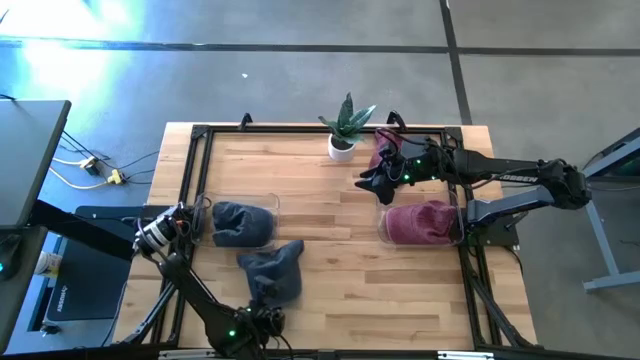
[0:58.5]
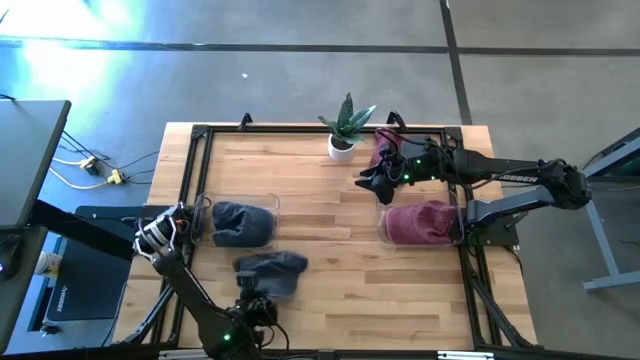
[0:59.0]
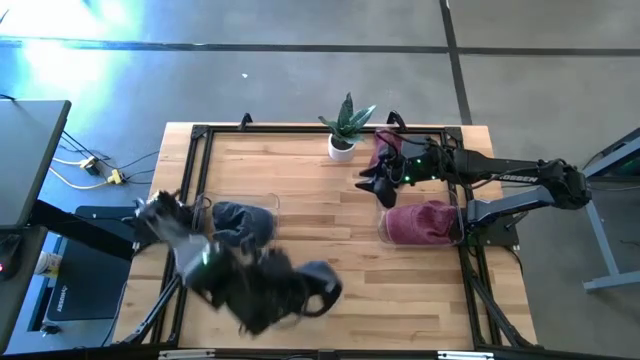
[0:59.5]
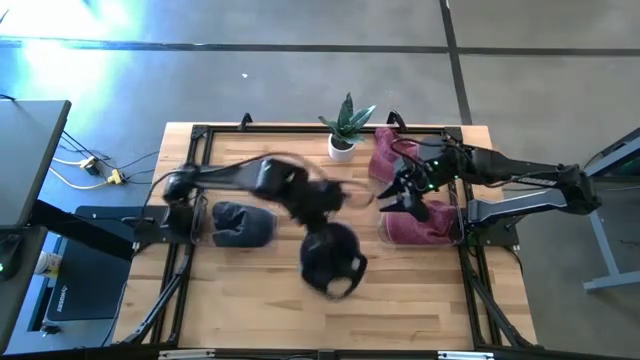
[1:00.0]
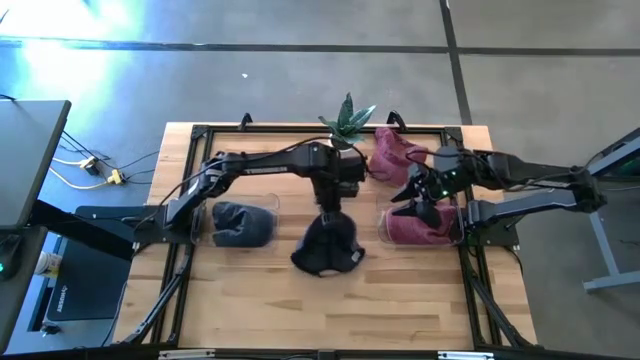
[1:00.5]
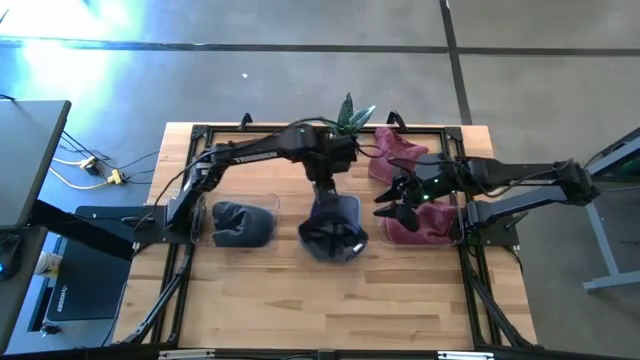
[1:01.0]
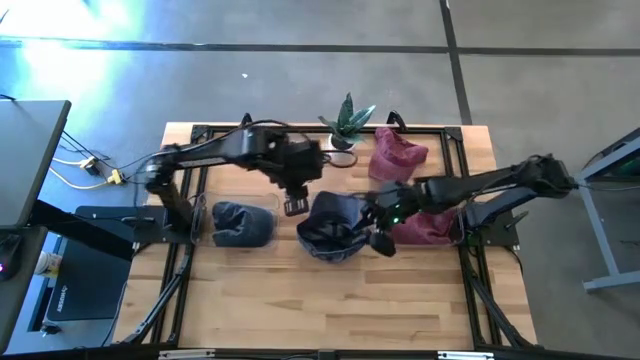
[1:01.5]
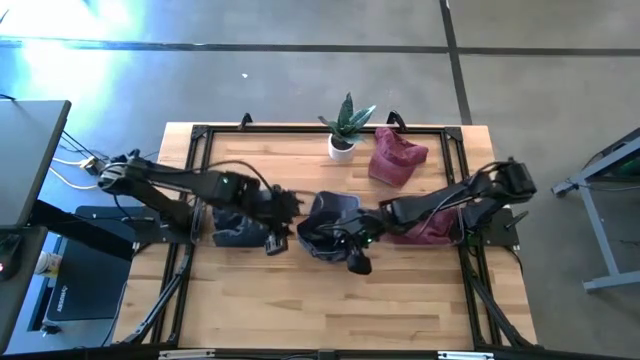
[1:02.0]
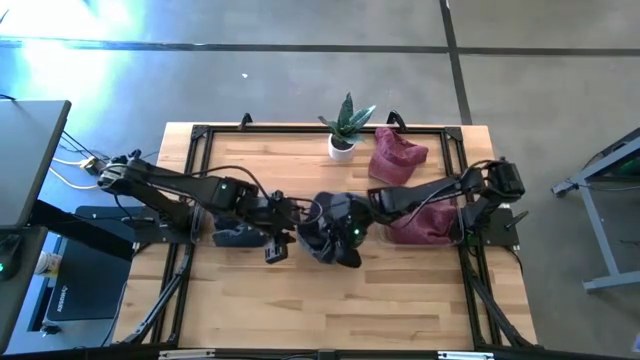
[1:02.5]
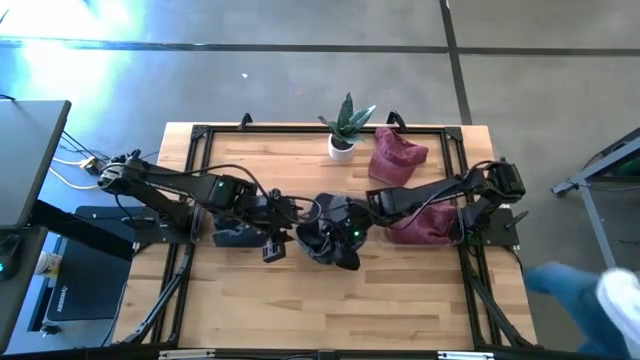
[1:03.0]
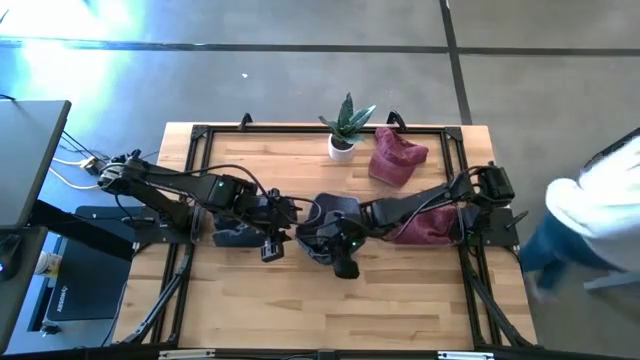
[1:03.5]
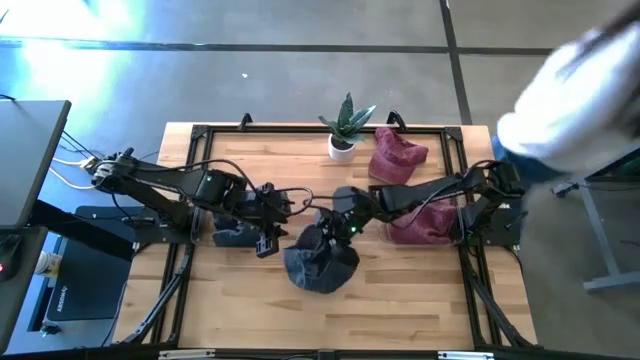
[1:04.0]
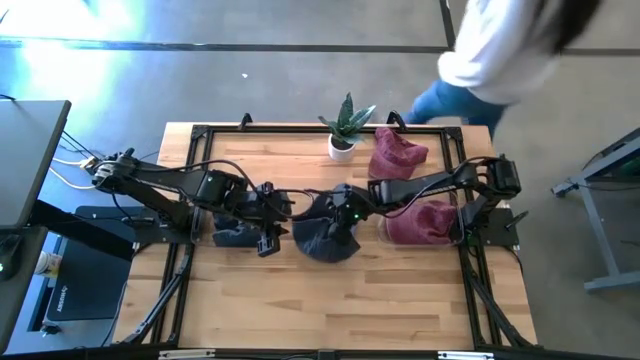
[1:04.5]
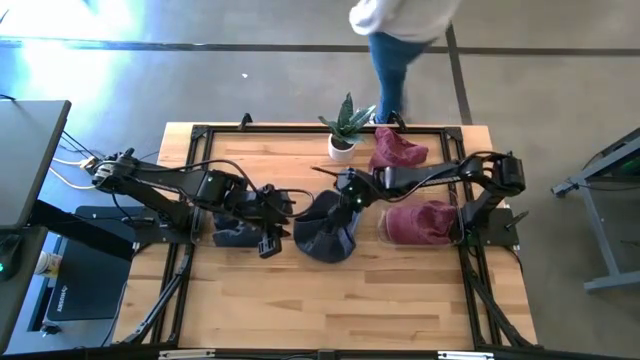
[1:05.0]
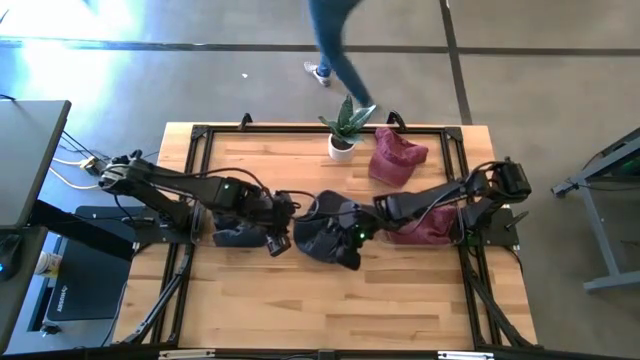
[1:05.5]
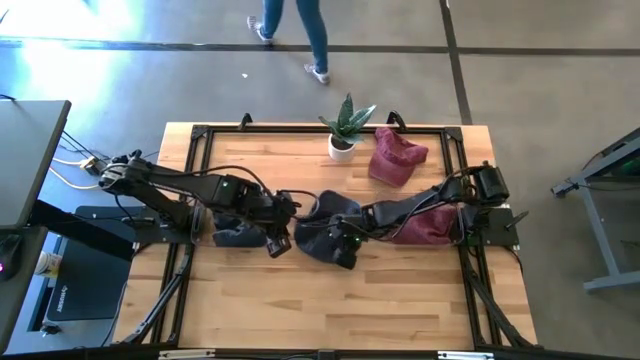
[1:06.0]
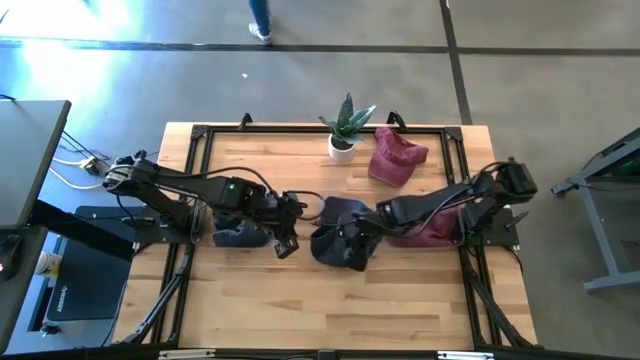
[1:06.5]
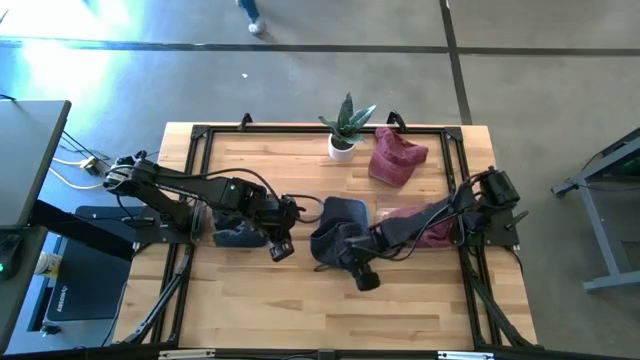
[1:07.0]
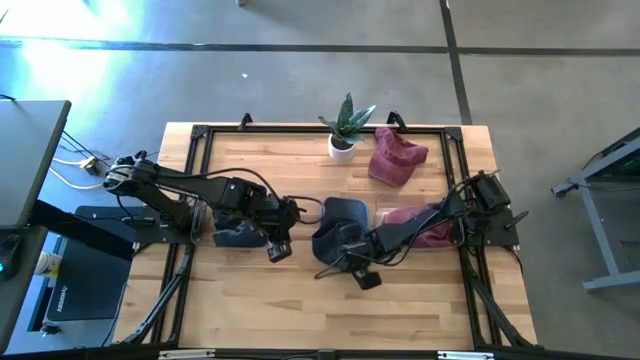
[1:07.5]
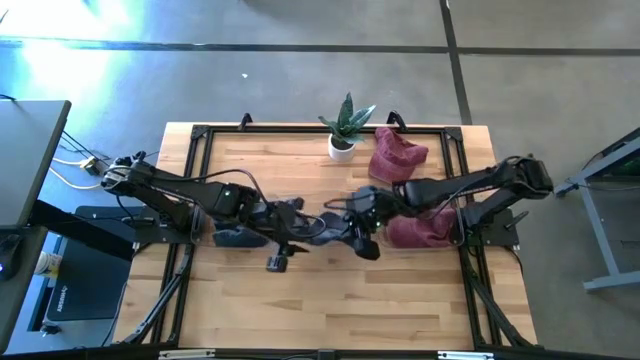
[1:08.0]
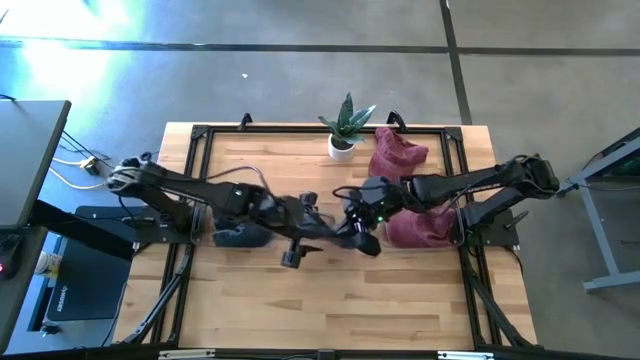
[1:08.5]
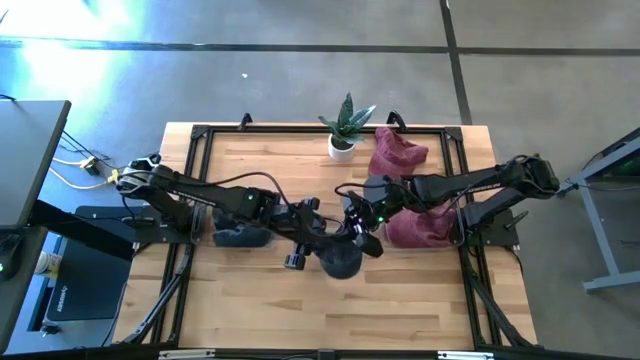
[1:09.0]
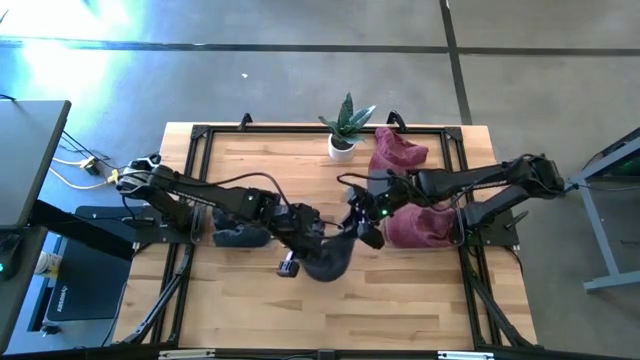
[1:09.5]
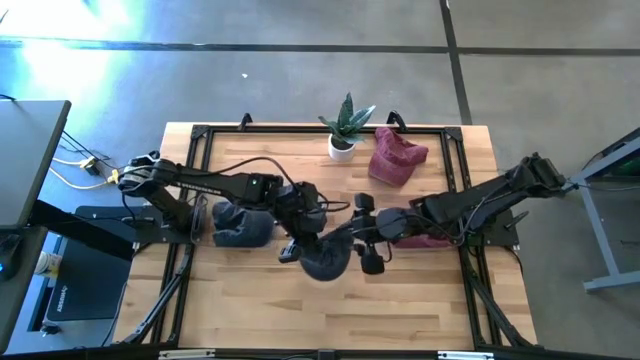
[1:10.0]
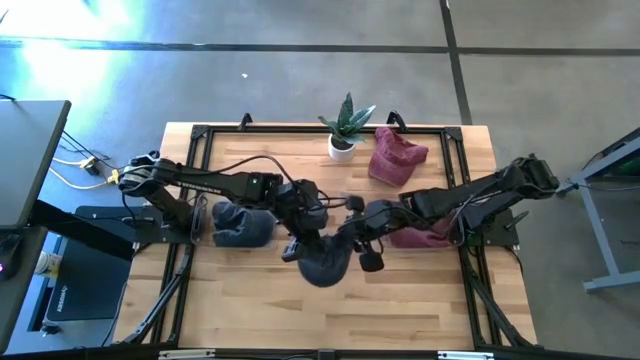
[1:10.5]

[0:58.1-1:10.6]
Task: Pick & Place hat
Put the blue cap into the left transparent bin

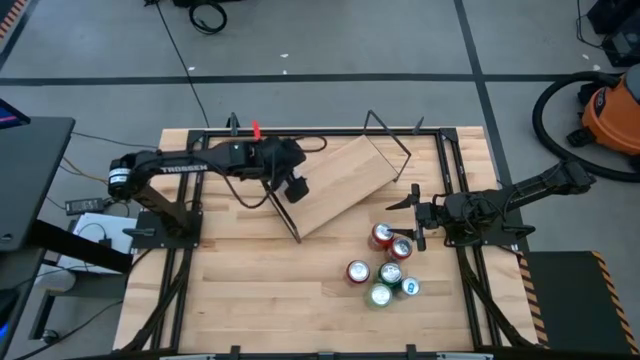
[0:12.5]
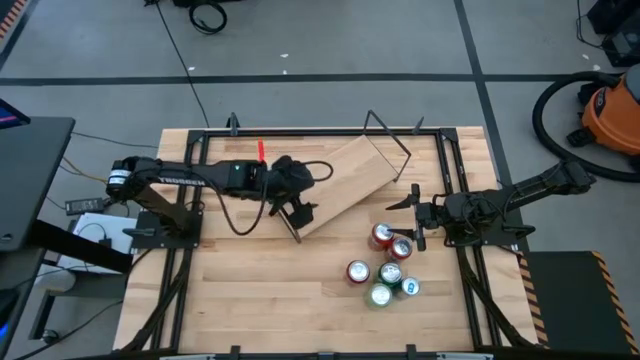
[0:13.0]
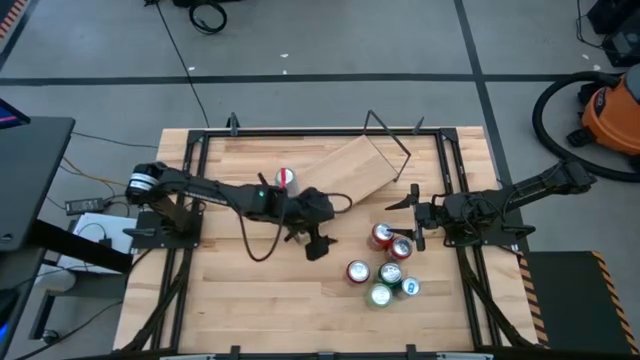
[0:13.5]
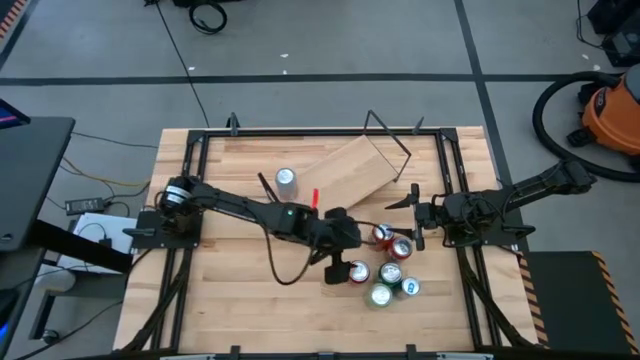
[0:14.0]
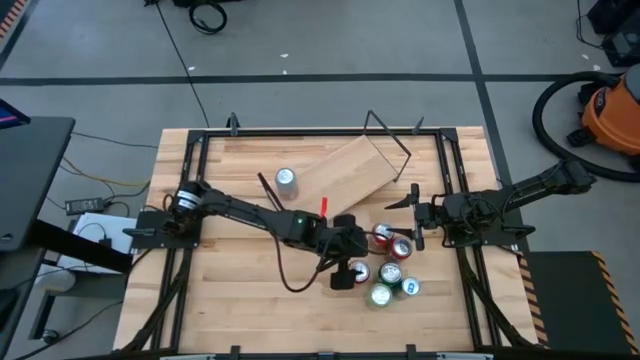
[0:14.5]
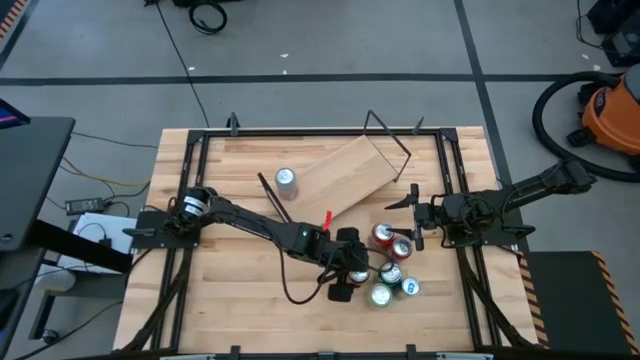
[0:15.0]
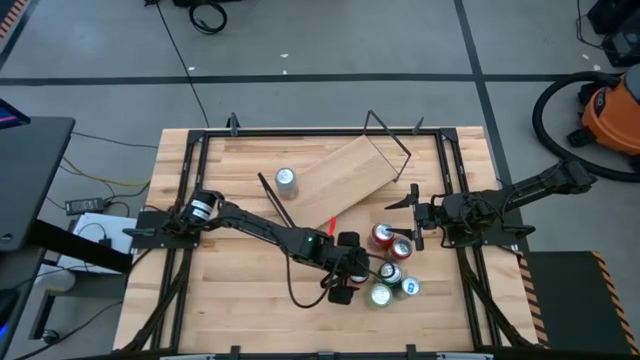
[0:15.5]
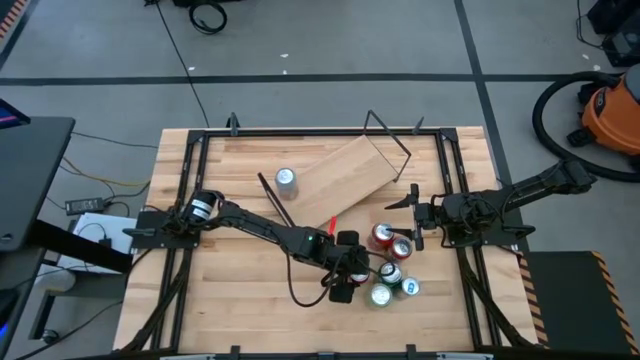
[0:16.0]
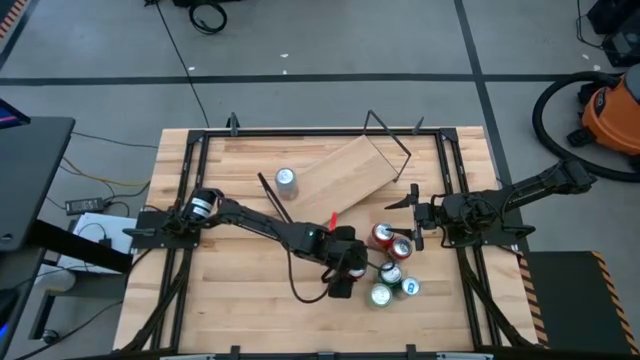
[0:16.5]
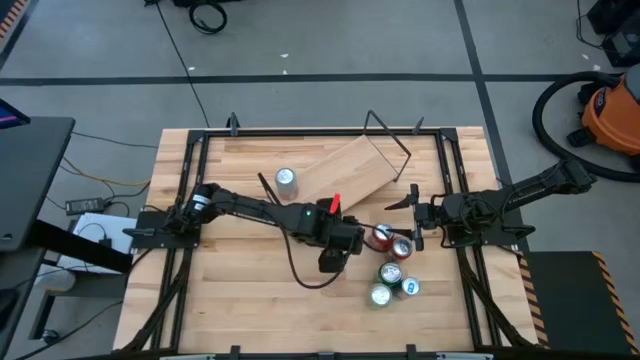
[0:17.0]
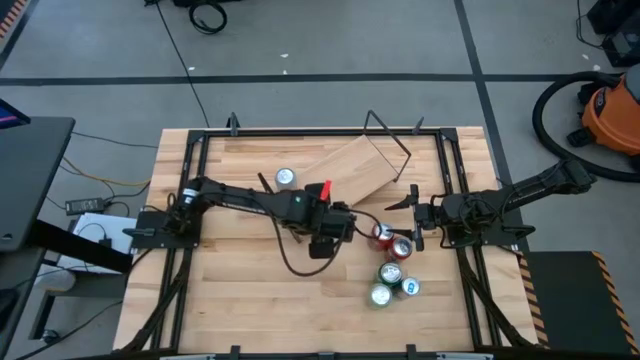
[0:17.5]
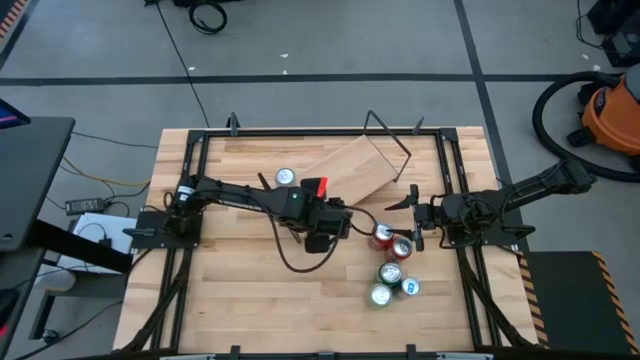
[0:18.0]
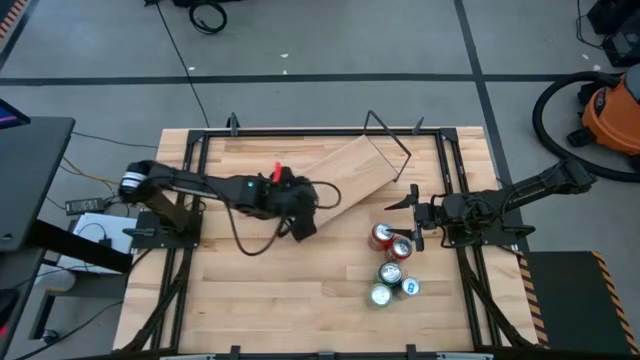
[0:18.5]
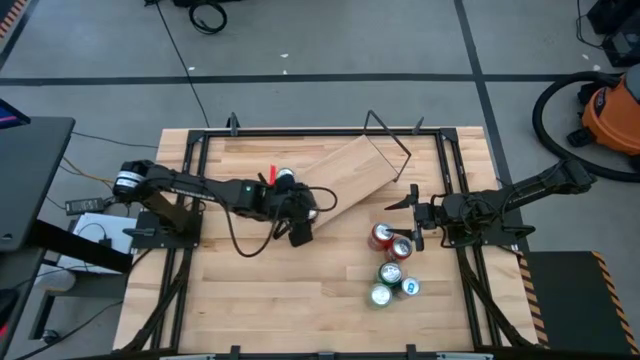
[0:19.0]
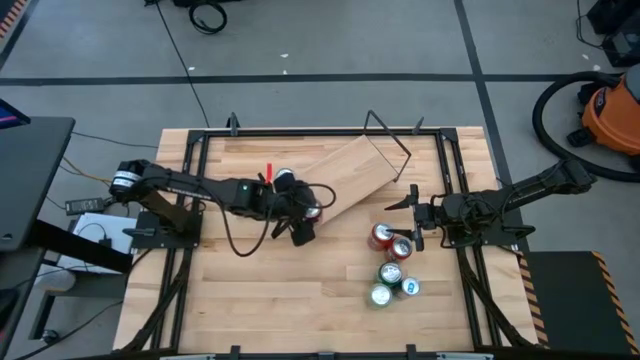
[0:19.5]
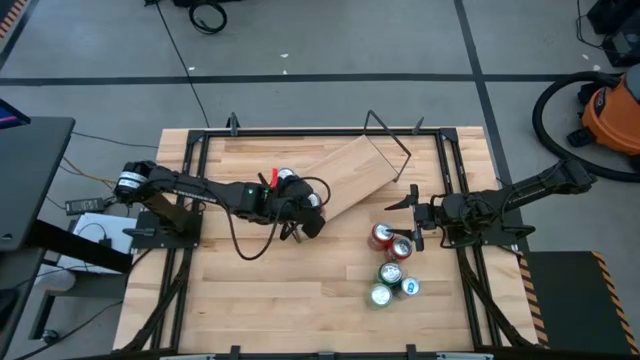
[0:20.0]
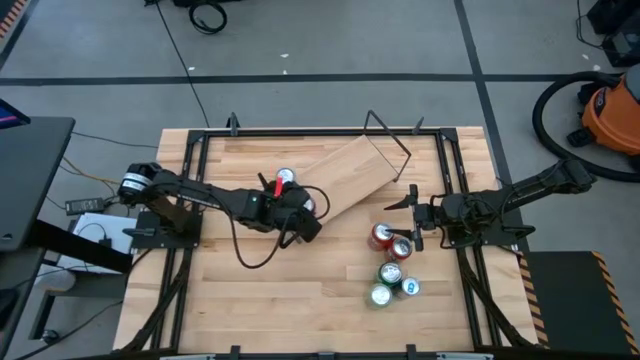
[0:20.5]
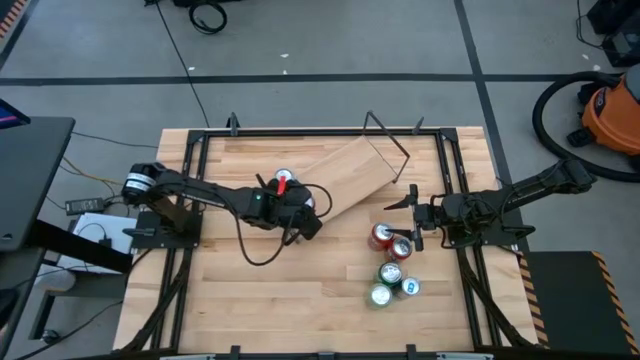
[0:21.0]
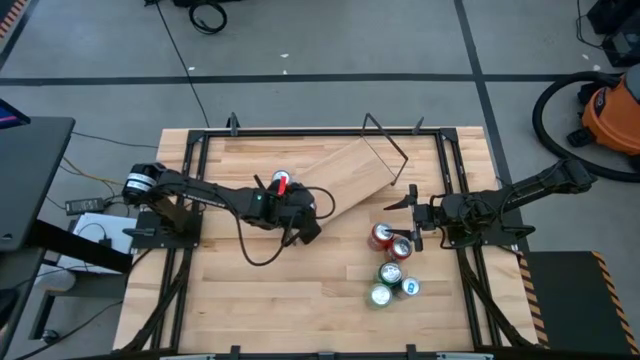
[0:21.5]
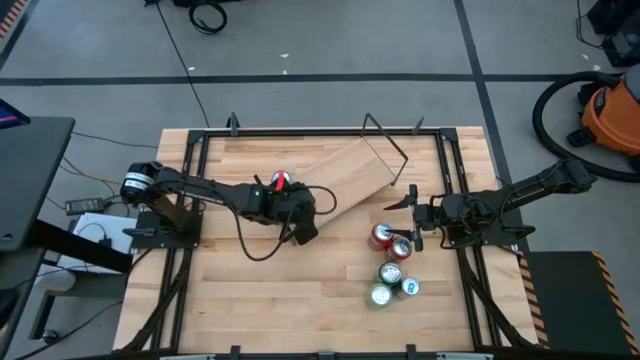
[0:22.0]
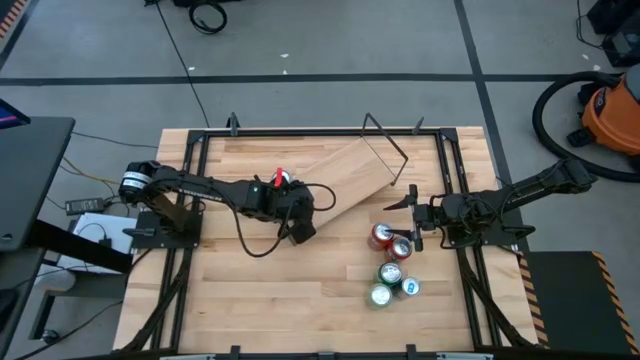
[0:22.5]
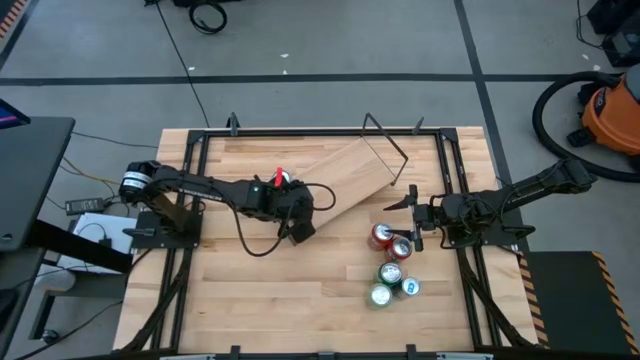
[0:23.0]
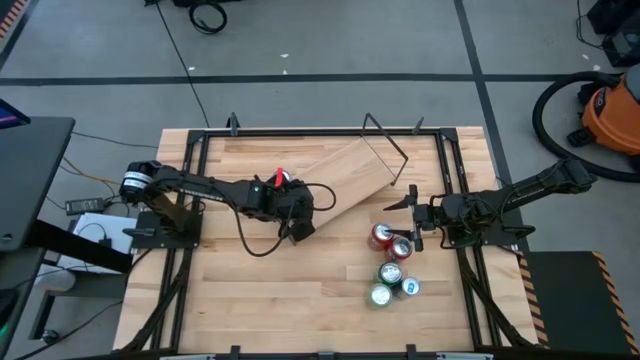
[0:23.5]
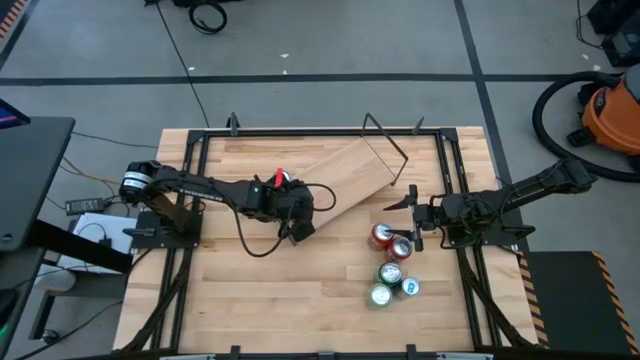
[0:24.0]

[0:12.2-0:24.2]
Task: Place canned beverage on shelf
Put the red black soda can on the shelf
